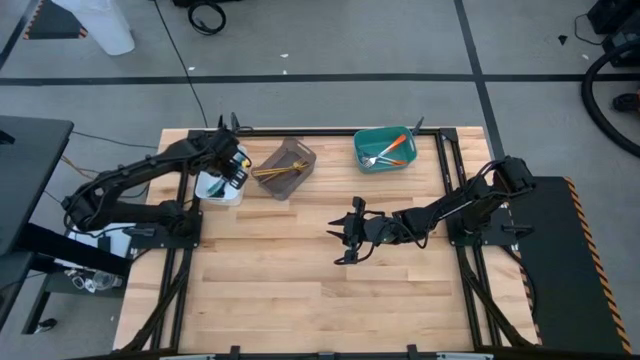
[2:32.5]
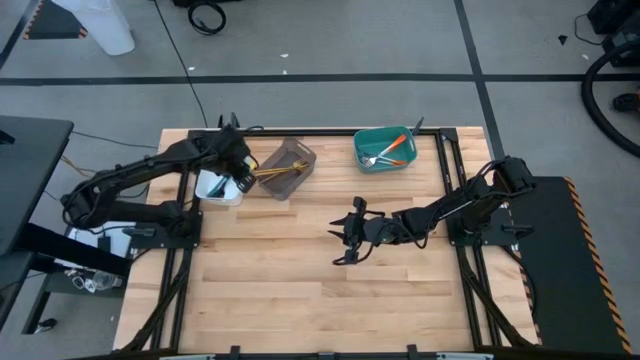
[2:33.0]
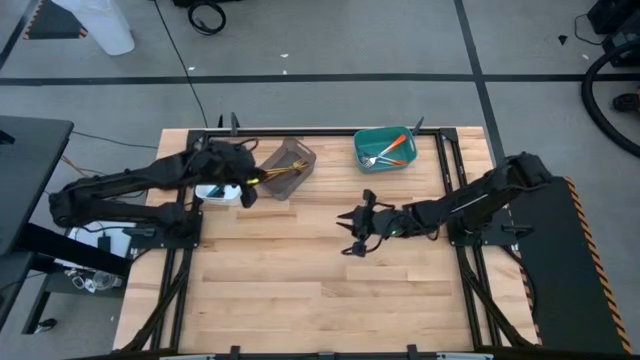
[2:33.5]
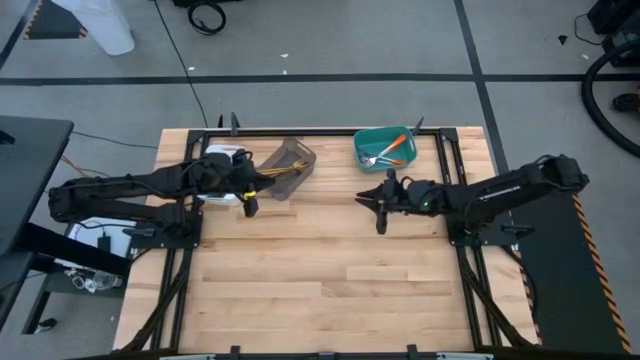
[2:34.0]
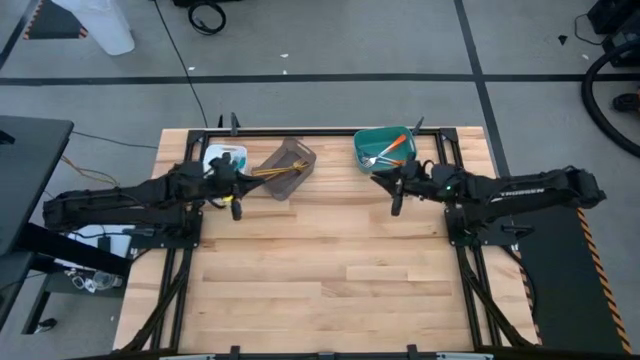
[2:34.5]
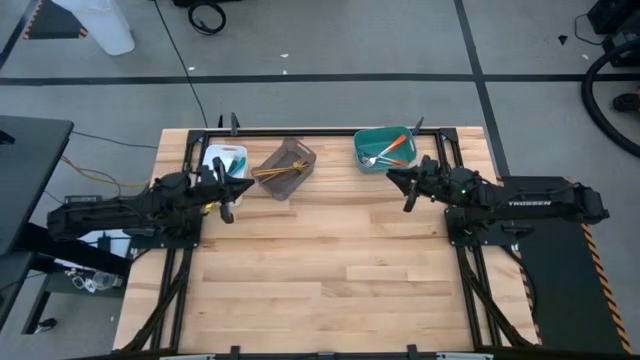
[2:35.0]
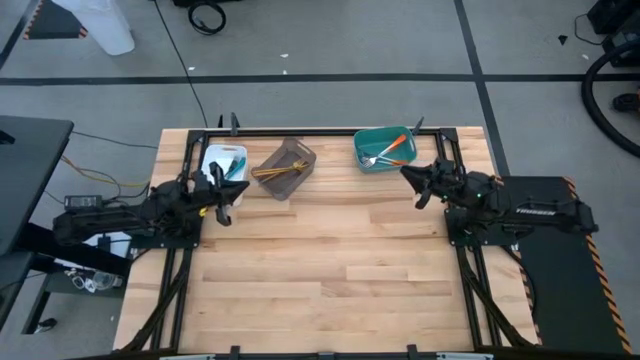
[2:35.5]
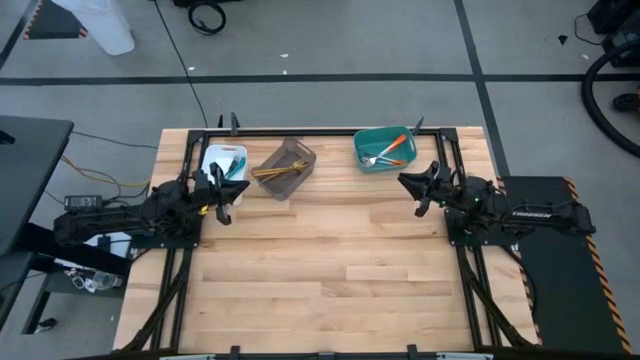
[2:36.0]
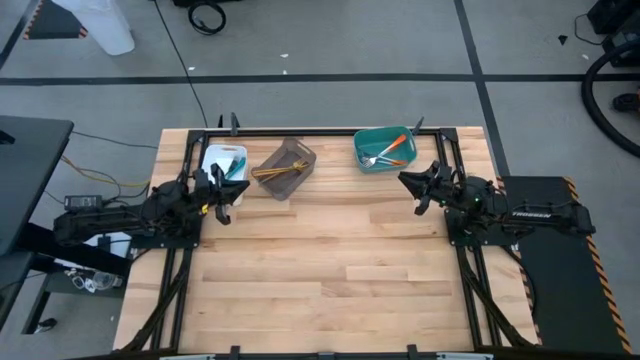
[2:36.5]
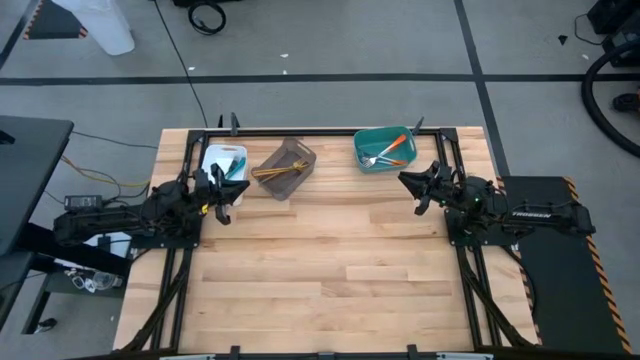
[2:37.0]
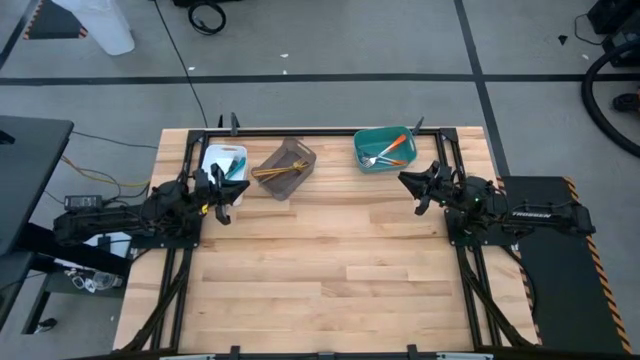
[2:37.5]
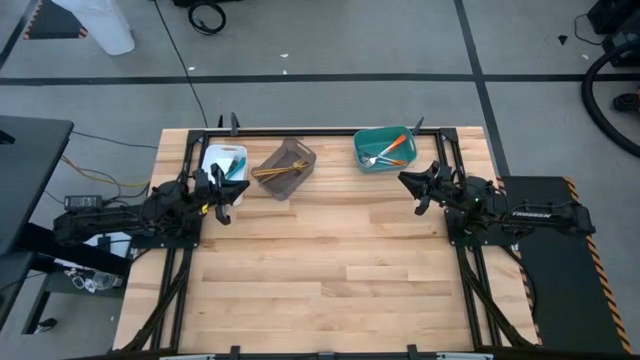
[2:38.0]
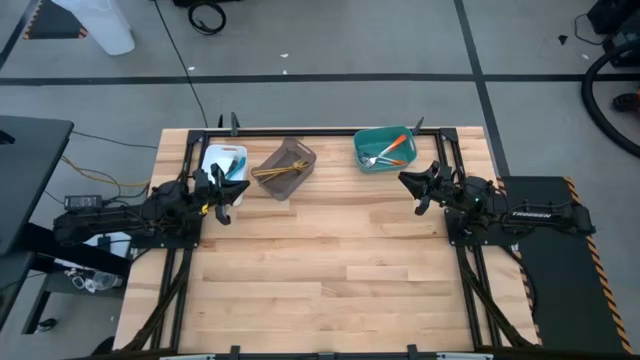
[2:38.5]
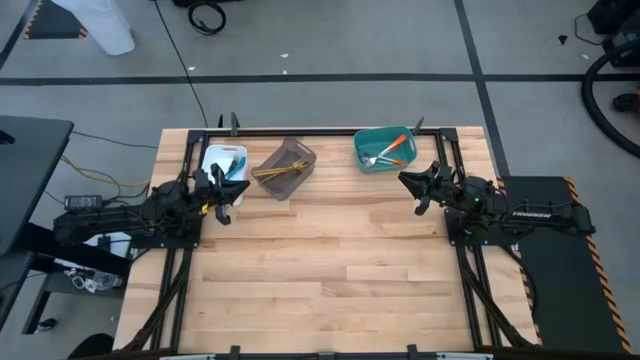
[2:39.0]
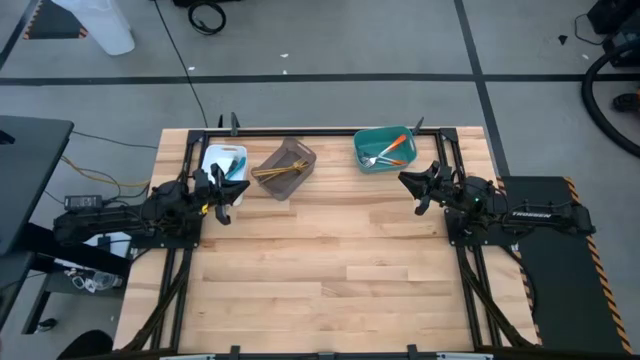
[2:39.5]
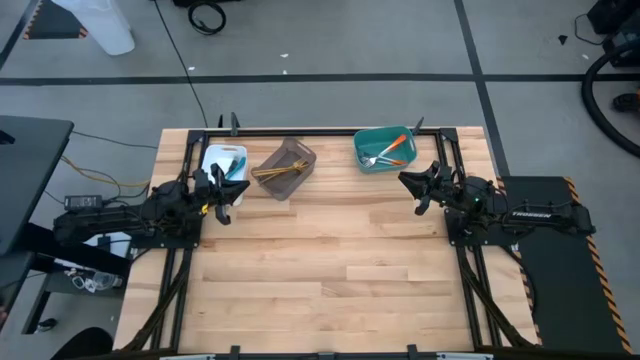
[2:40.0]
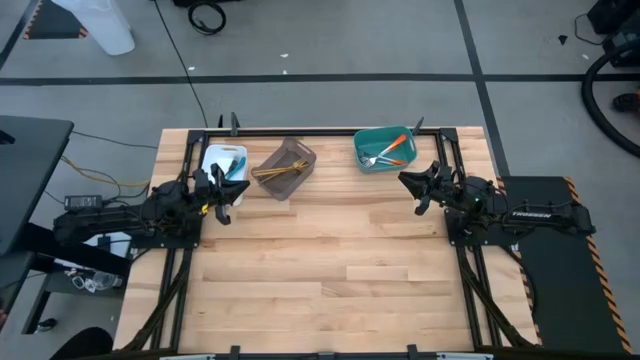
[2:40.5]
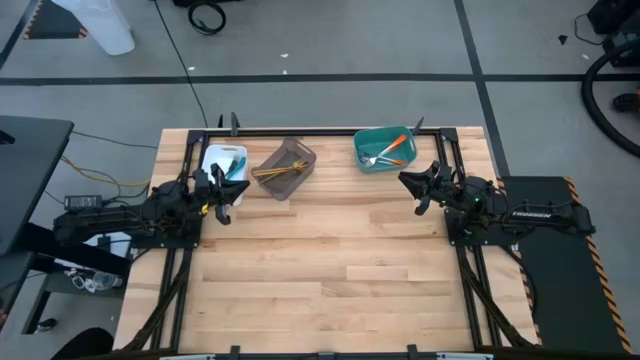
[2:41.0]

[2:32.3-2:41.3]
Task: Sort silverware by color (type)
Return to Home Position

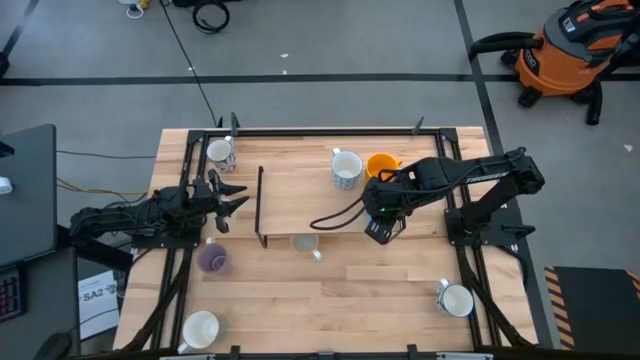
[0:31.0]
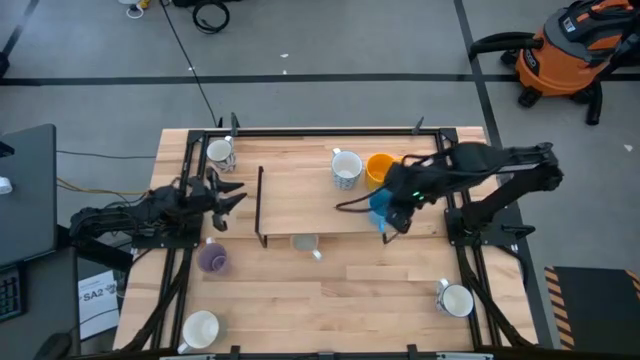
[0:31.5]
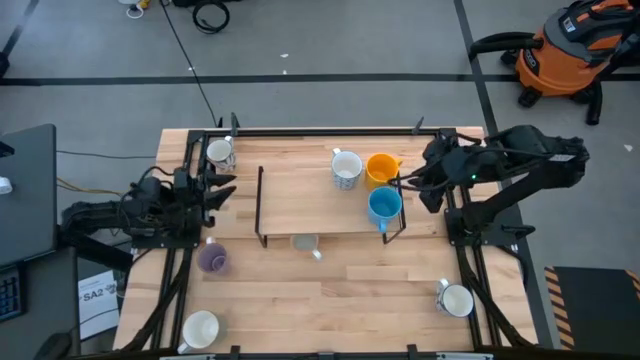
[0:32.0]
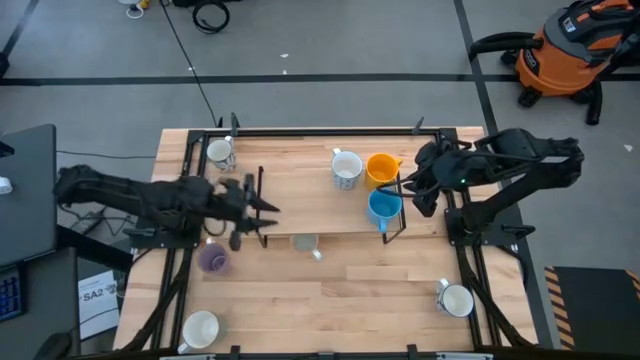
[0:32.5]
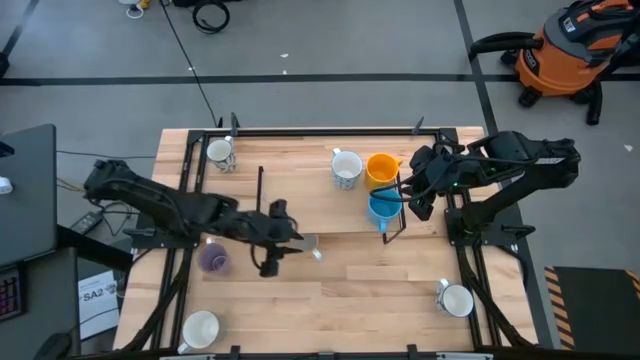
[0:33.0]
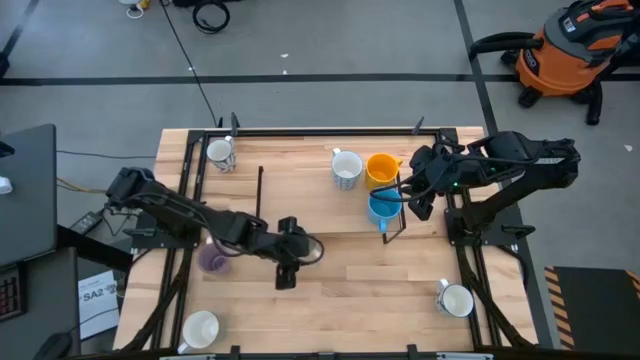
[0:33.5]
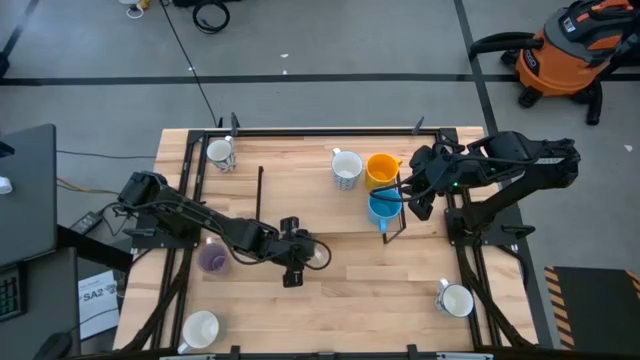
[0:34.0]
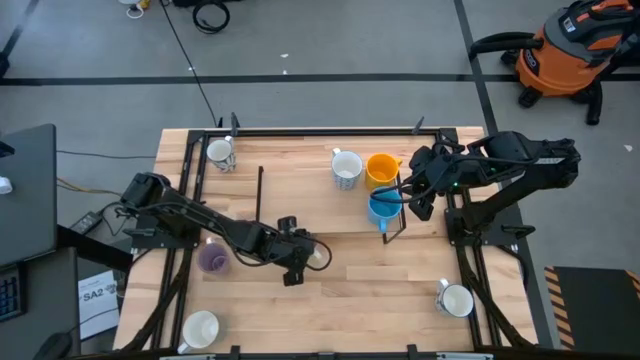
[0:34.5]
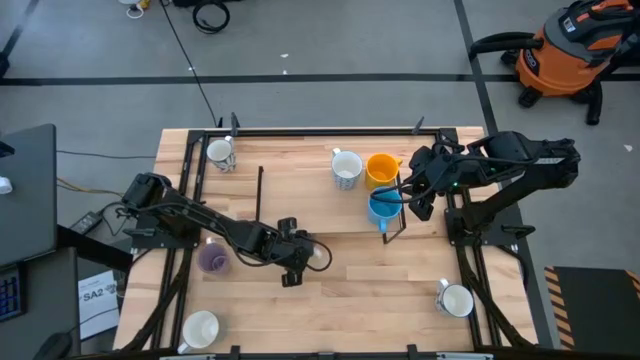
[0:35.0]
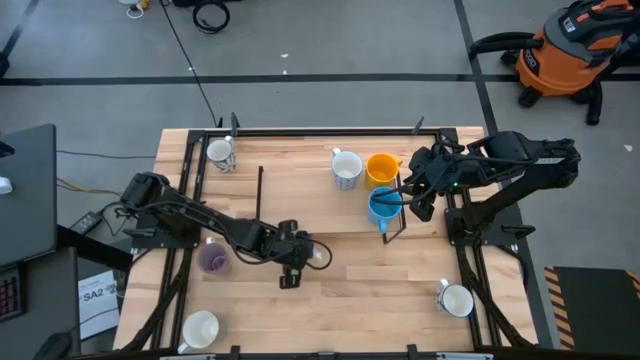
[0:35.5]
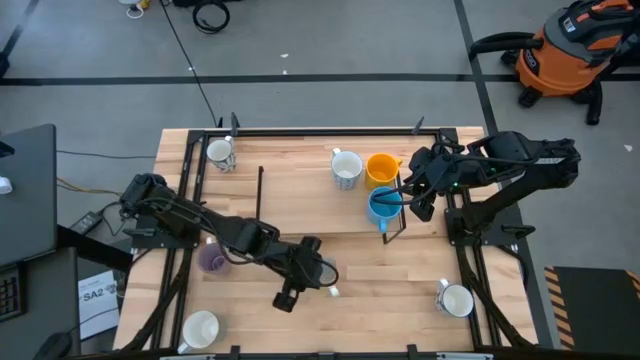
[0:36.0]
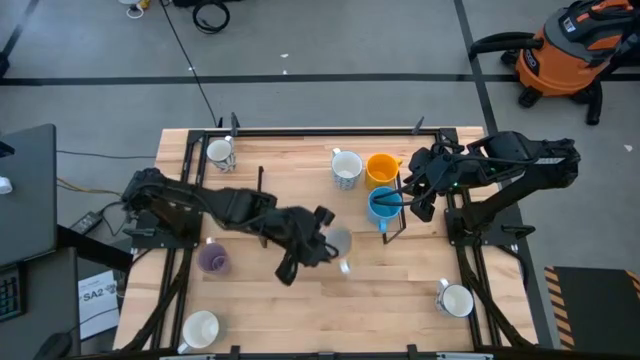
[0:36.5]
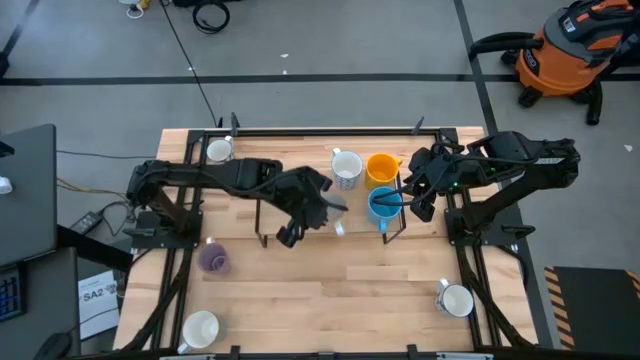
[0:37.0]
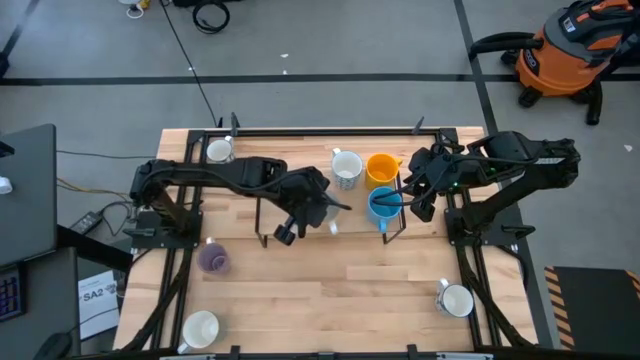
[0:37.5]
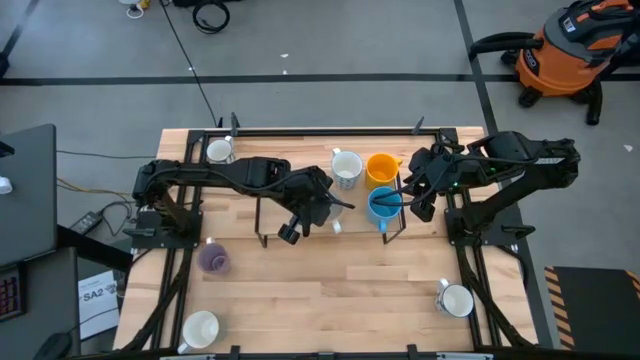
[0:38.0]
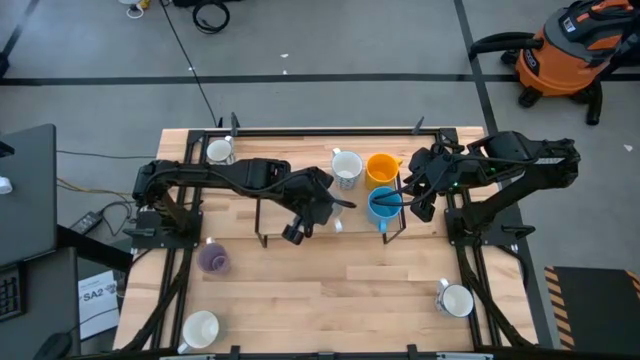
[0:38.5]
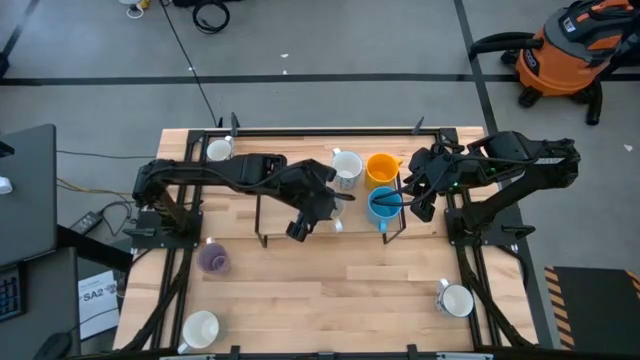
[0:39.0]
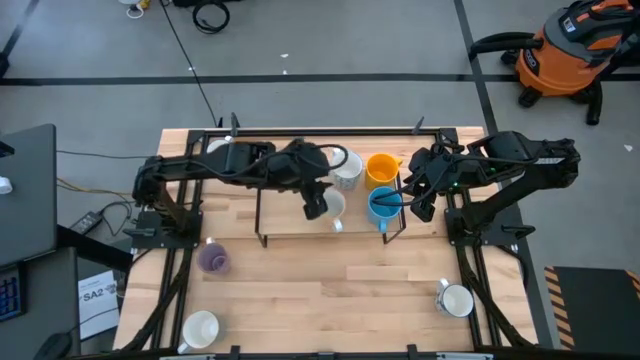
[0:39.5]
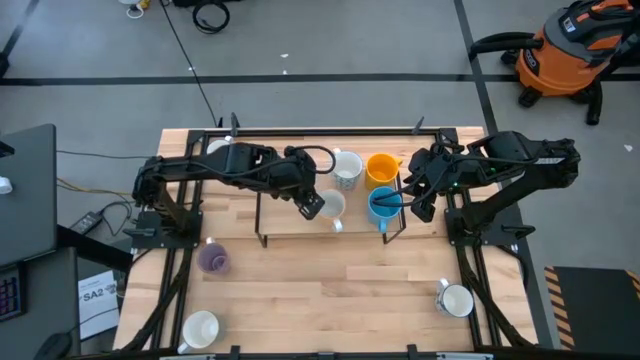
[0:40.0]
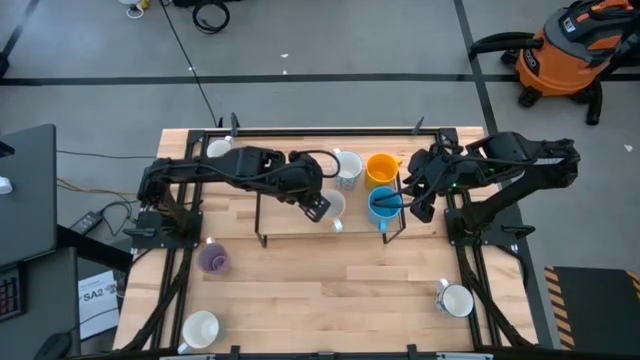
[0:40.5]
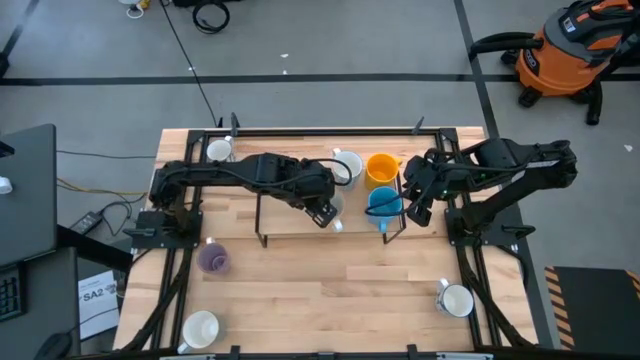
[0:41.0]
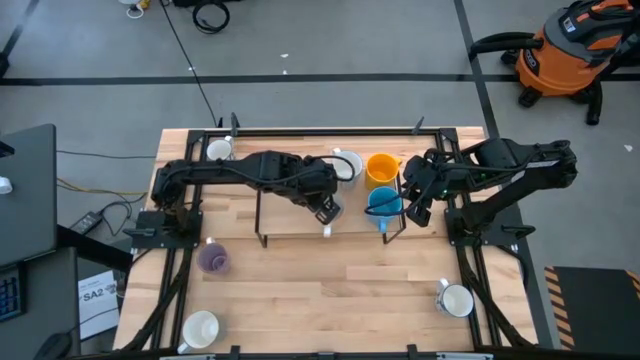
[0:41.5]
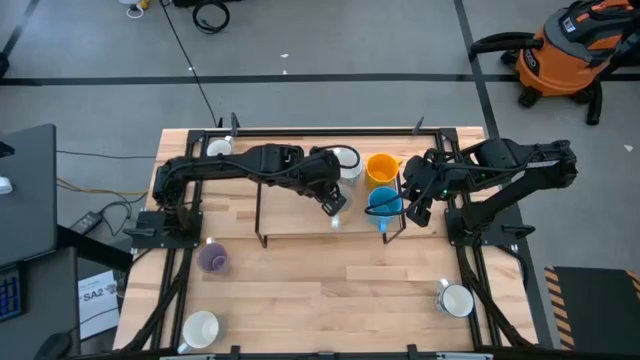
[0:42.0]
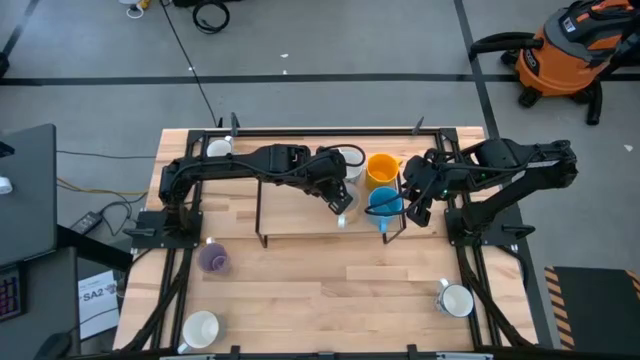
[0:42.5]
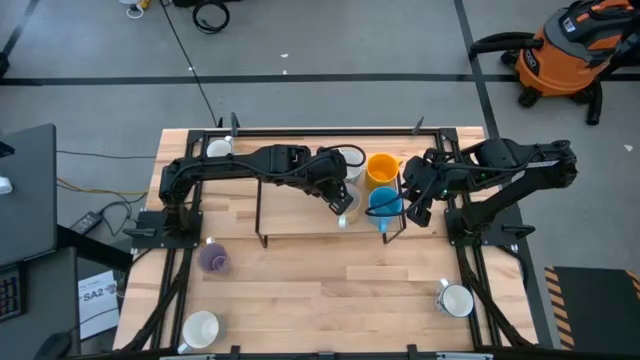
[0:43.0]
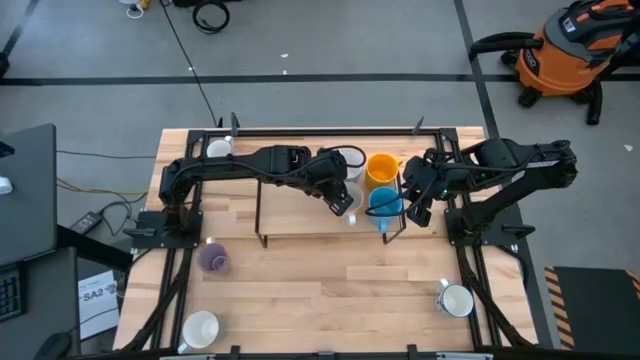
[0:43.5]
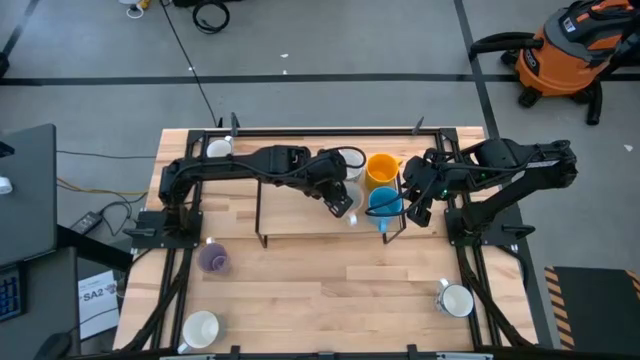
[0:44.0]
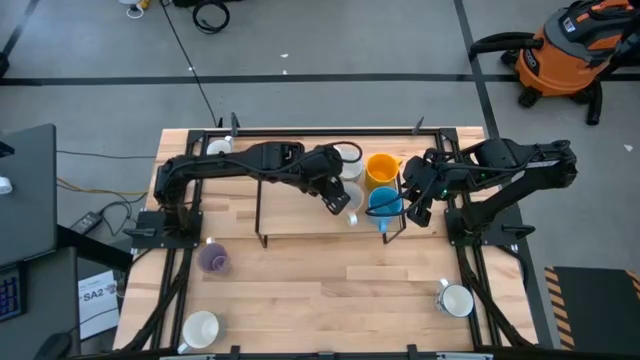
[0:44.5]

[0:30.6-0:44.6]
Task: Place coffee mugs
Put the yellow patterned mug on the shelf
